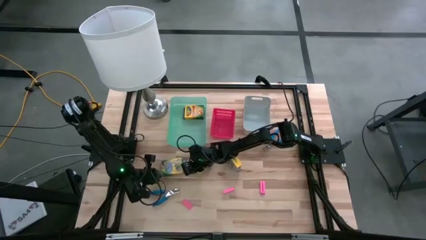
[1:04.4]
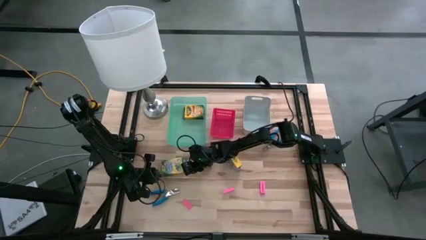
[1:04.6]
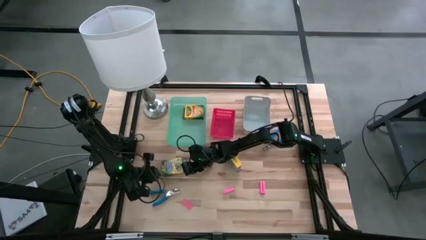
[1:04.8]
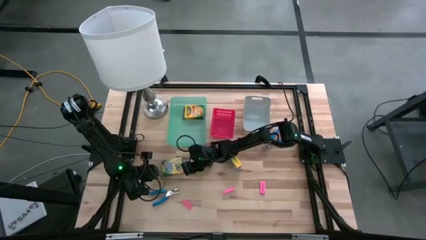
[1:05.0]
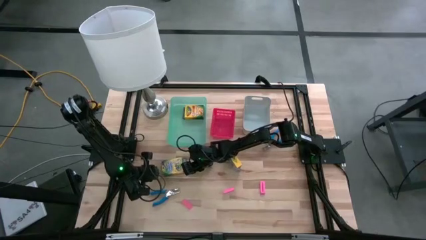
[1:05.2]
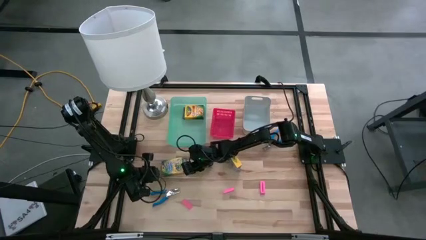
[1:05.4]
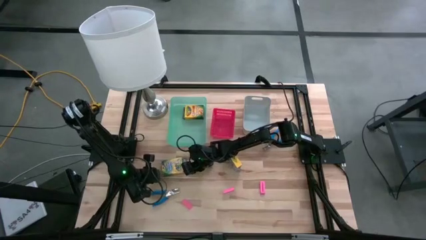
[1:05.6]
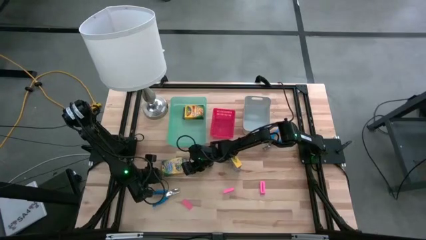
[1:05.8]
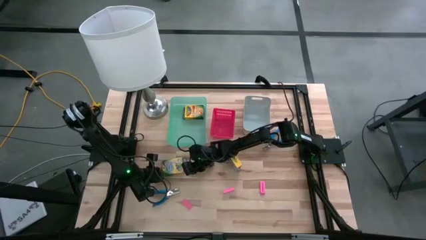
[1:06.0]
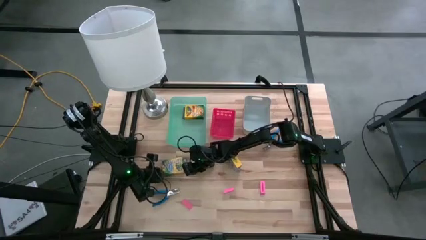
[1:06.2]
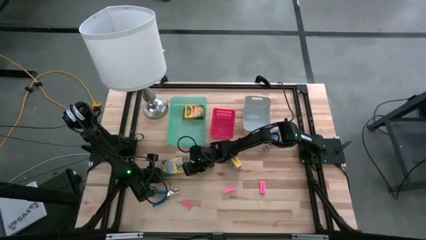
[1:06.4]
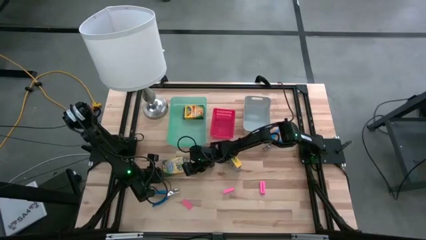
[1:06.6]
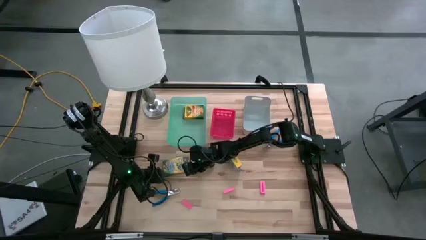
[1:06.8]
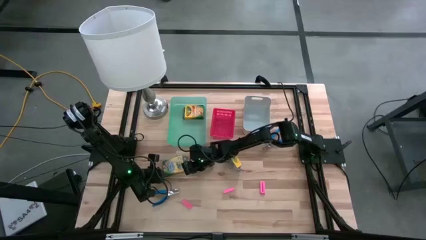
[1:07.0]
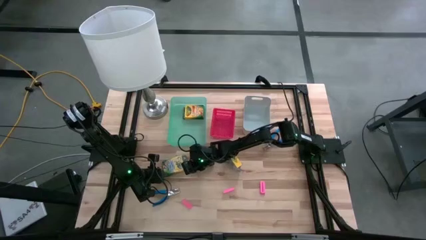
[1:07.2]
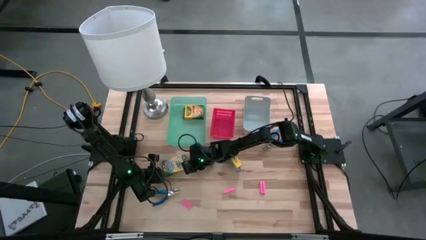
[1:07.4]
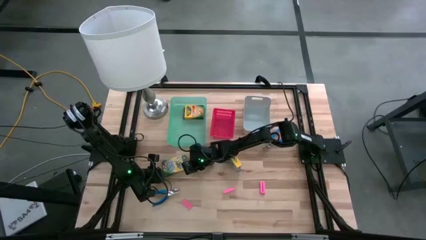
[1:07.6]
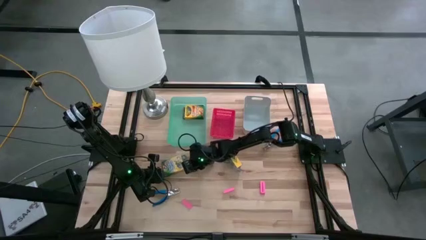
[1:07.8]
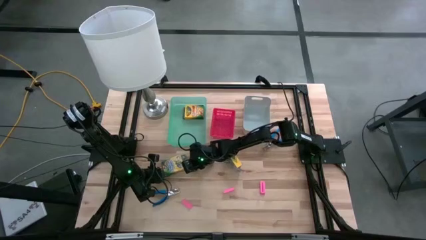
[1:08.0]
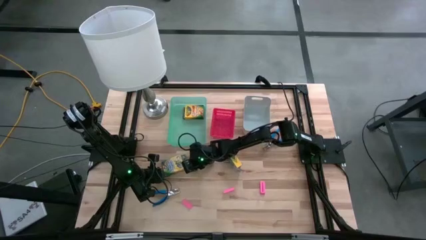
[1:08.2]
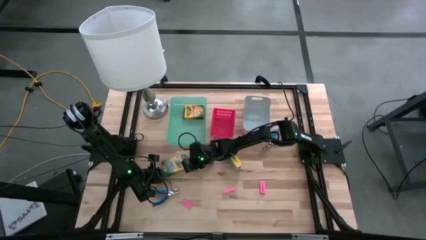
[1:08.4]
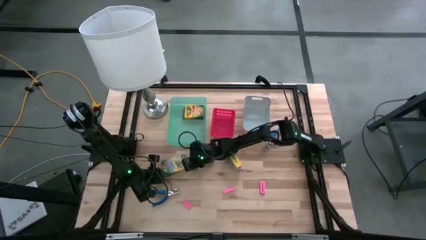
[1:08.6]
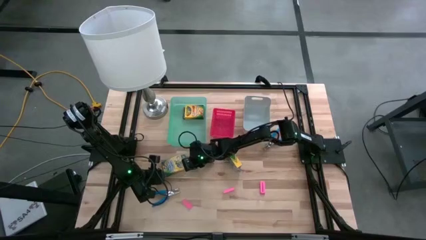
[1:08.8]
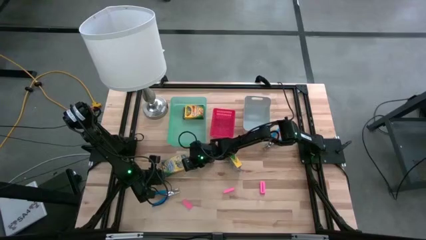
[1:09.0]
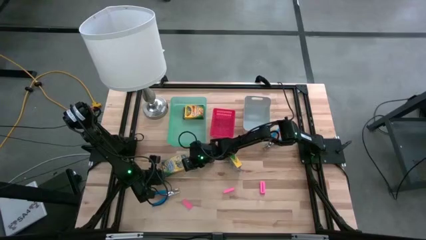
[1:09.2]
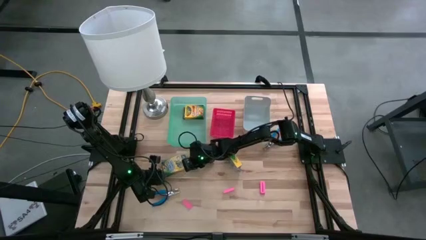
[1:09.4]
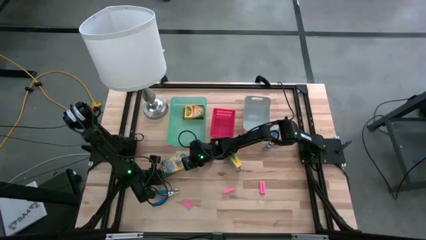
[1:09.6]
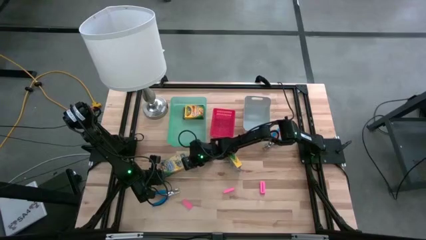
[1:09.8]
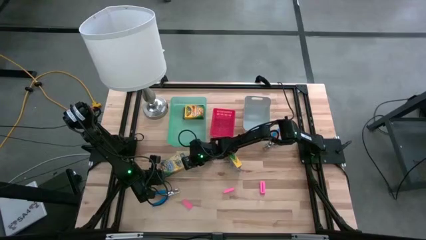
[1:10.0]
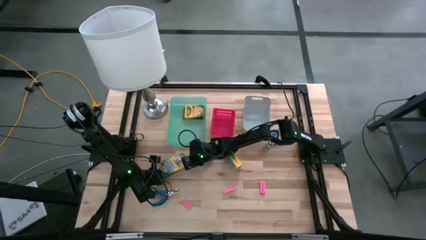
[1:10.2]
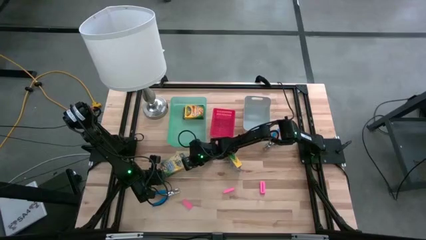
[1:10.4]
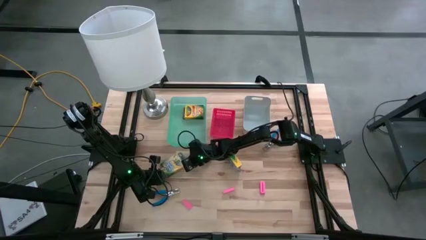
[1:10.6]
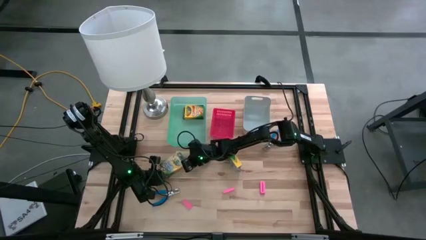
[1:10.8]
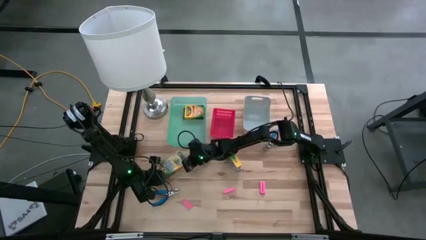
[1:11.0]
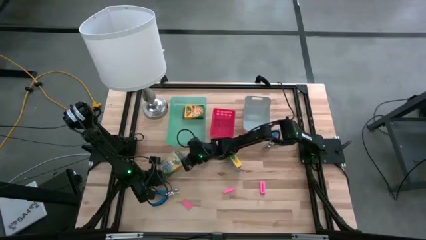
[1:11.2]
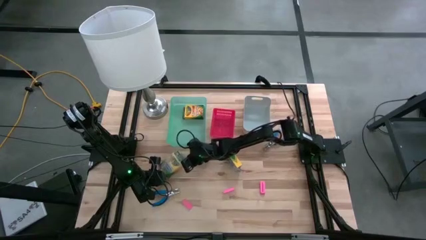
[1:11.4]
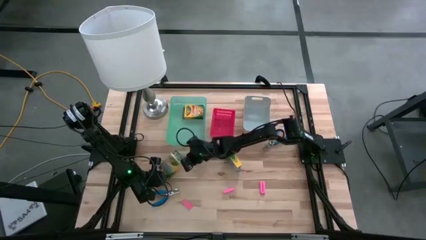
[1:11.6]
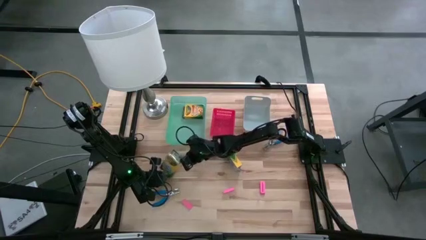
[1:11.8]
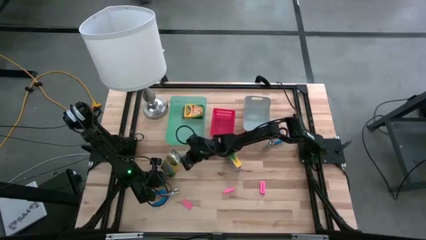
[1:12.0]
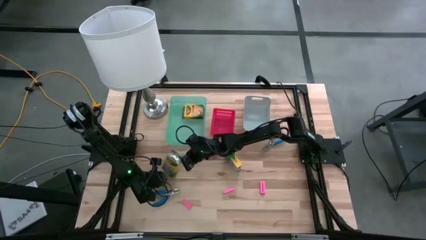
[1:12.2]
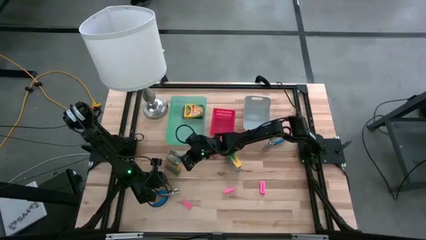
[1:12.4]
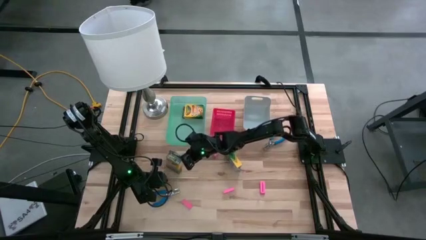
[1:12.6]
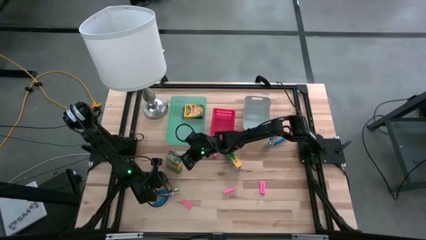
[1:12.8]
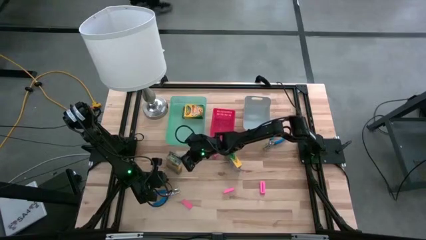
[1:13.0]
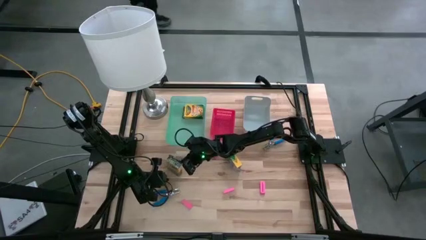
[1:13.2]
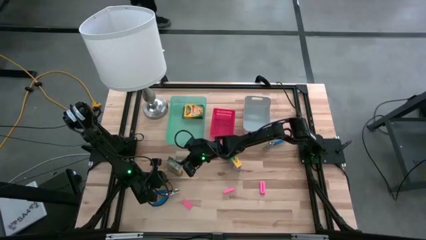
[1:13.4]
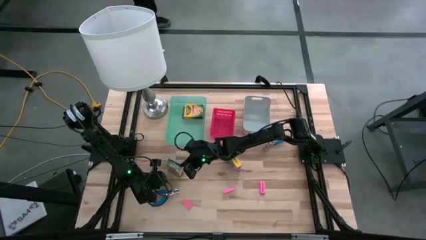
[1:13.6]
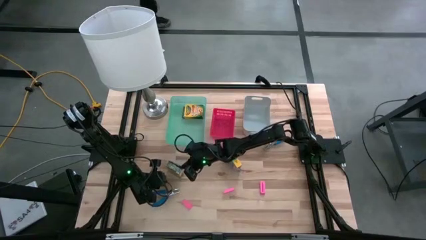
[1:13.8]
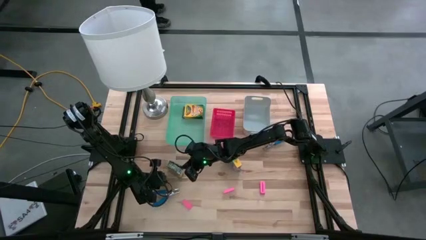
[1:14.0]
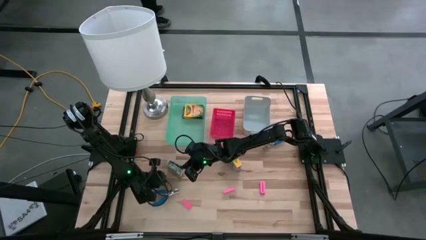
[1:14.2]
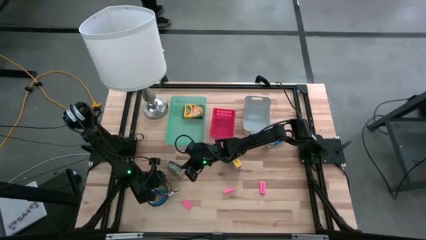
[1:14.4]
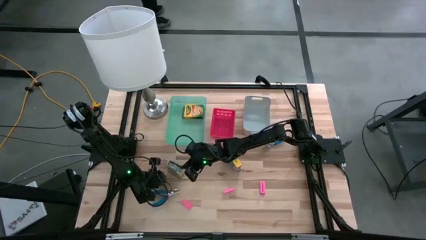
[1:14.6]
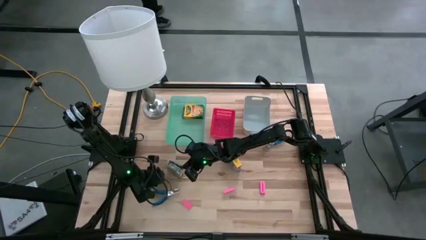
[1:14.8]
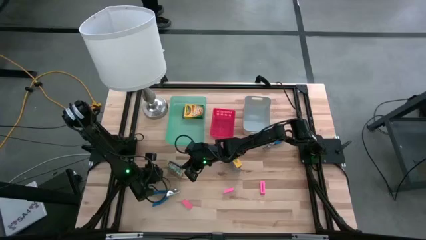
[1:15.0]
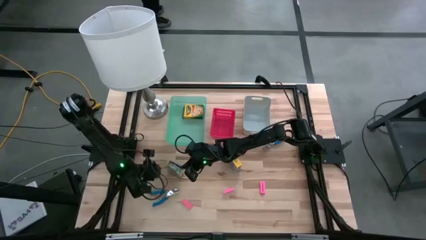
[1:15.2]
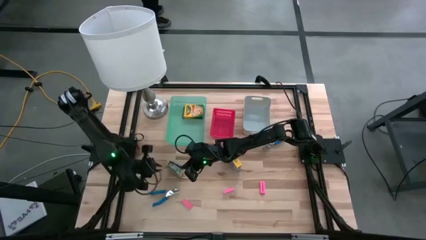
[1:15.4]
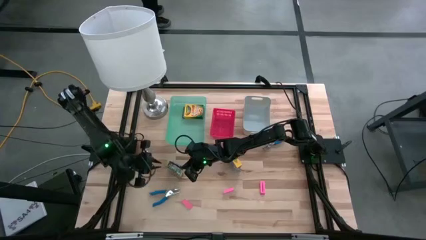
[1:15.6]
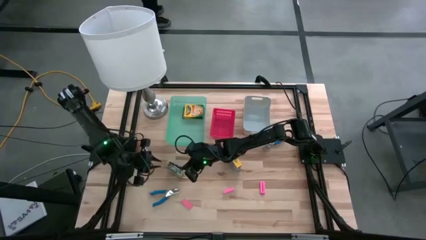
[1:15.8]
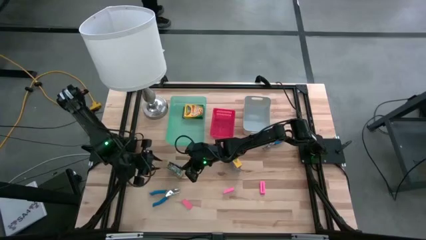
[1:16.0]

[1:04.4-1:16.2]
Task: Pick & Place School Supplies
Put the yellow crayon box into the green bin
